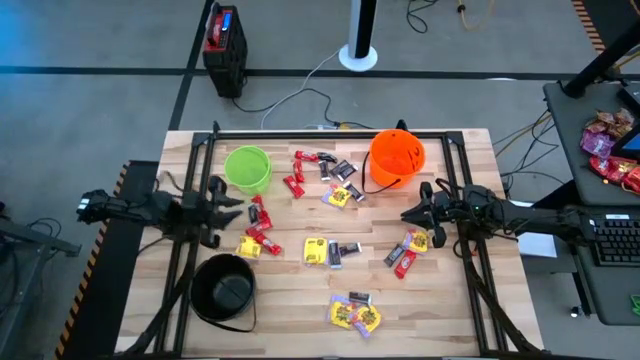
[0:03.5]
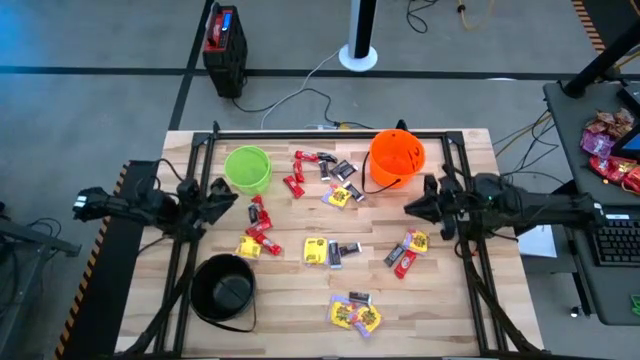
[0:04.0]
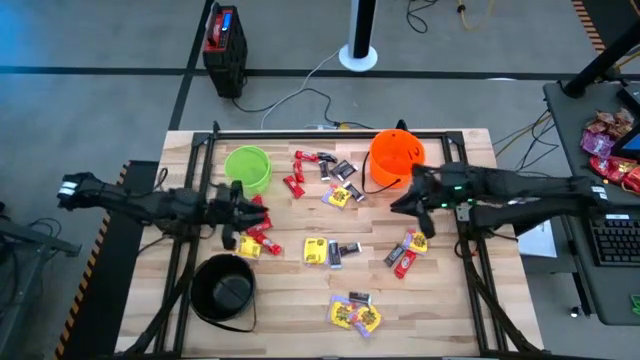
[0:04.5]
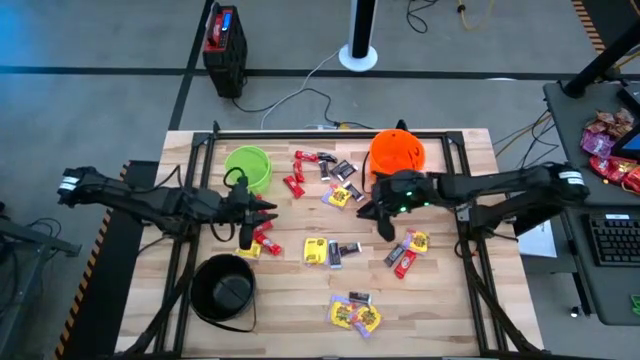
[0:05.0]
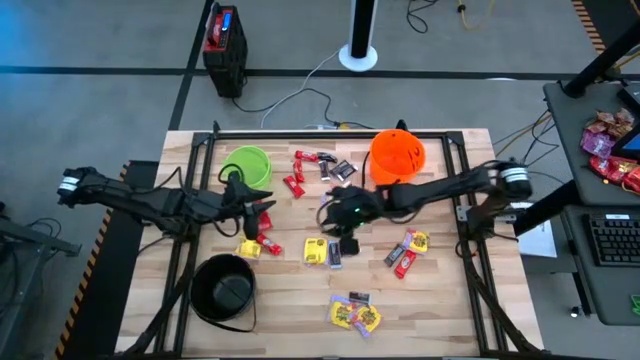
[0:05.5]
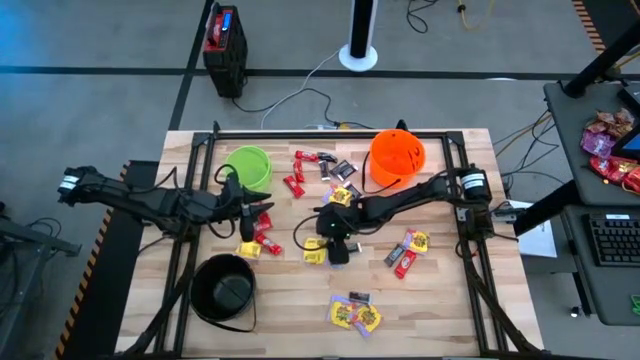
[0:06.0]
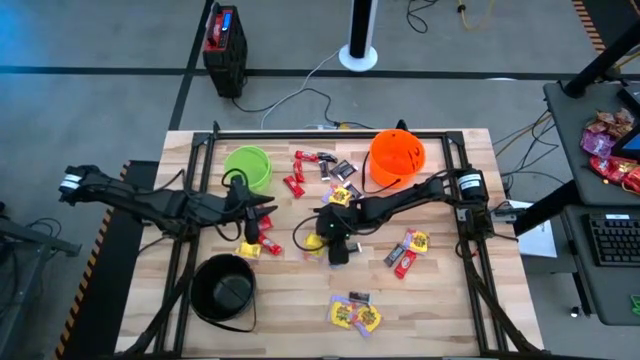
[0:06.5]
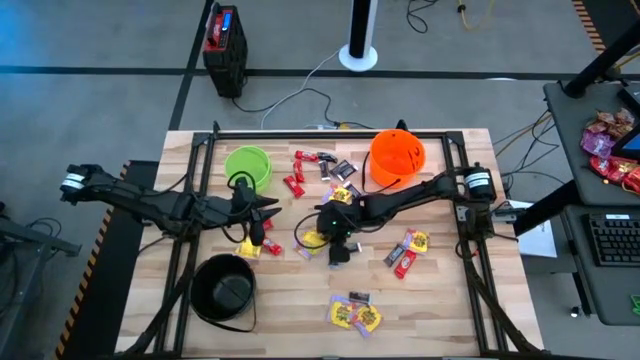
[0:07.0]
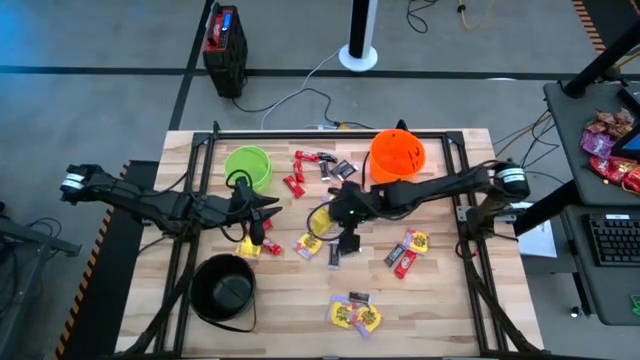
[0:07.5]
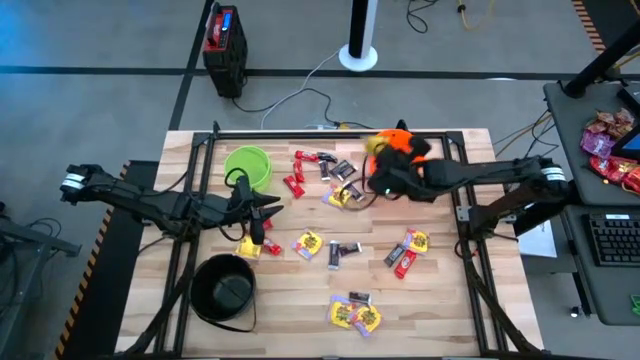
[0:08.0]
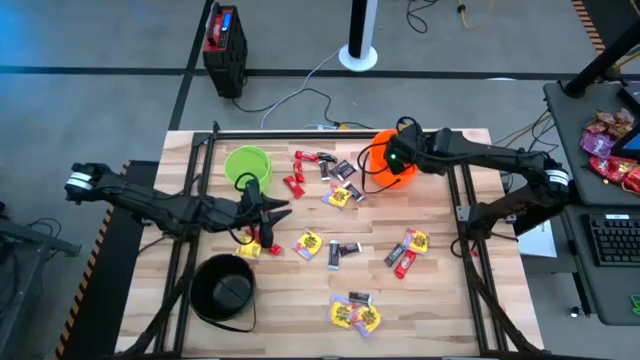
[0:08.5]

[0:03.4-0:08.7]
Task: Sort candy by brand, put in halloween buckets
Put the yellow candy into the orange bucket

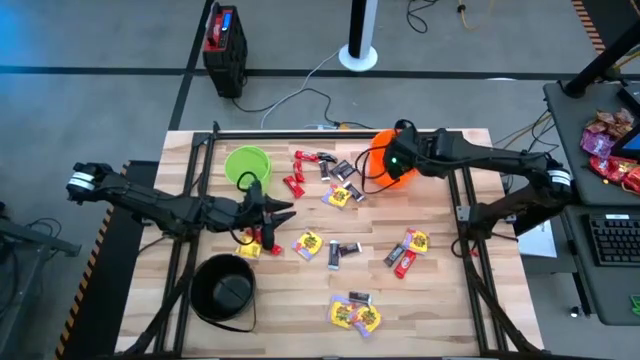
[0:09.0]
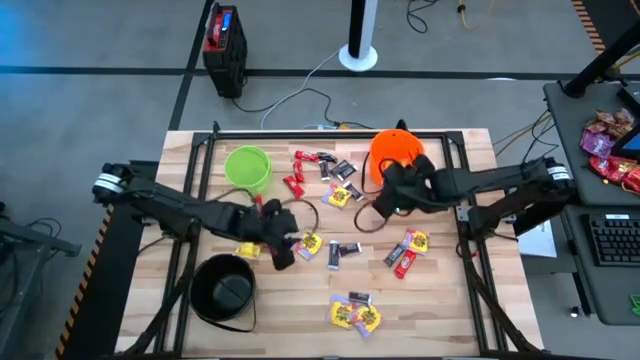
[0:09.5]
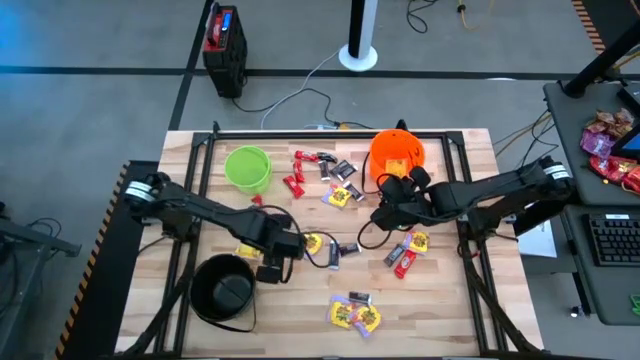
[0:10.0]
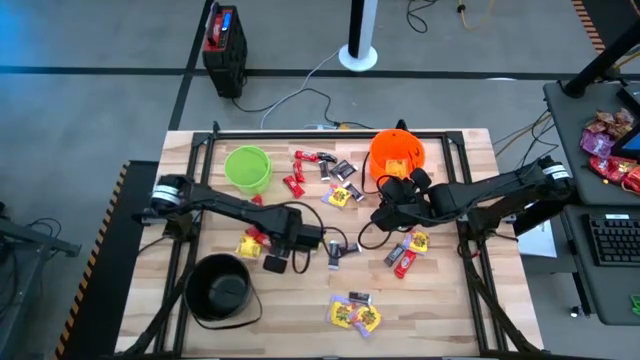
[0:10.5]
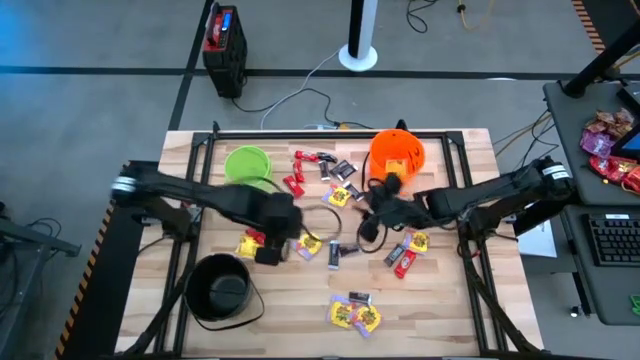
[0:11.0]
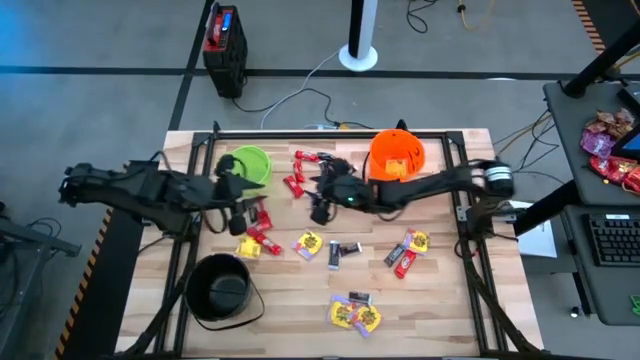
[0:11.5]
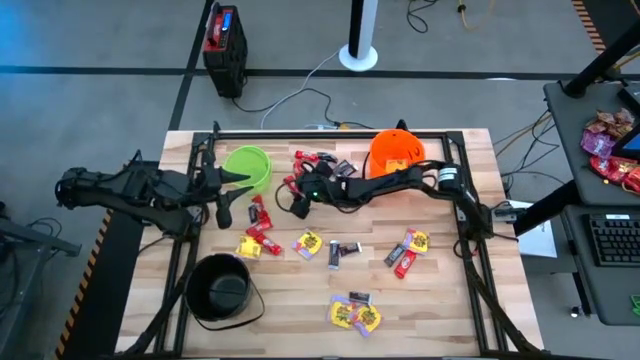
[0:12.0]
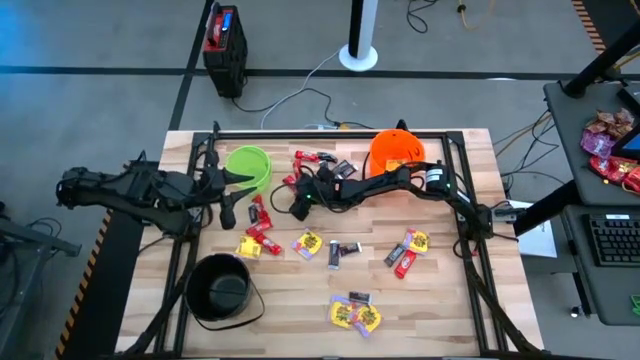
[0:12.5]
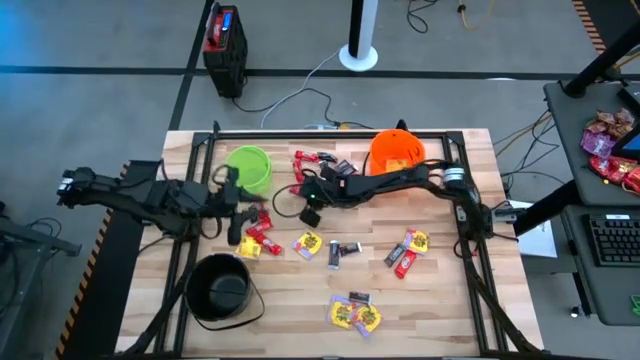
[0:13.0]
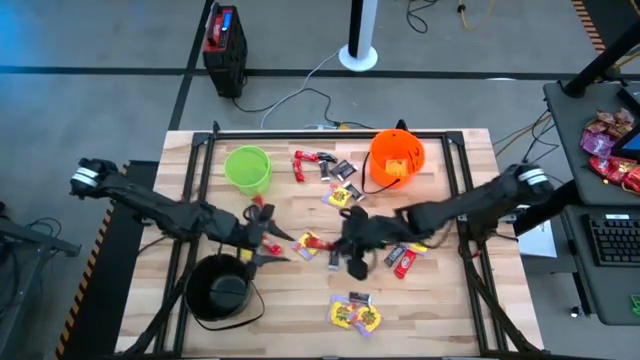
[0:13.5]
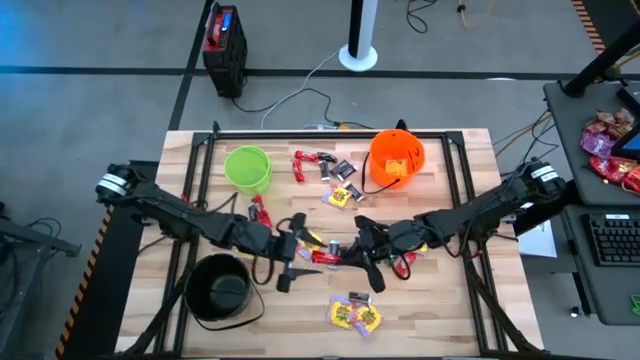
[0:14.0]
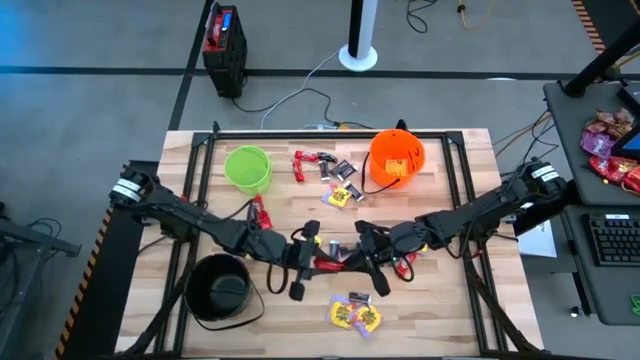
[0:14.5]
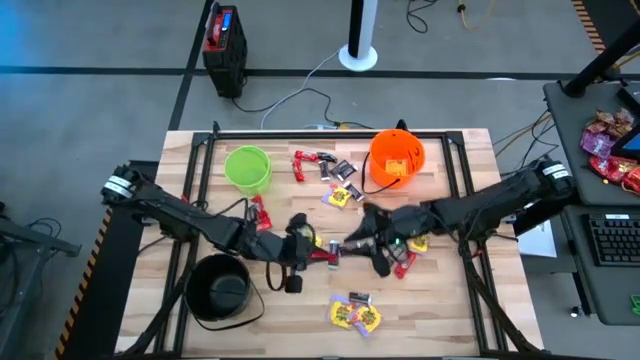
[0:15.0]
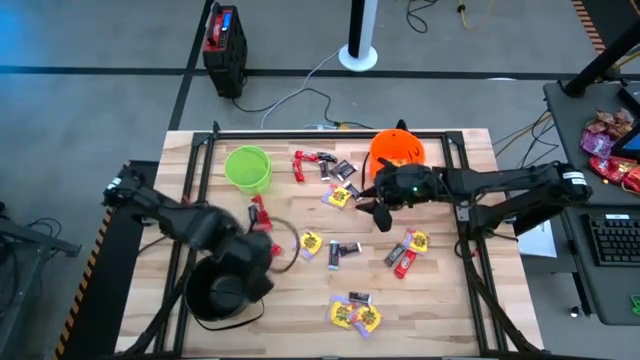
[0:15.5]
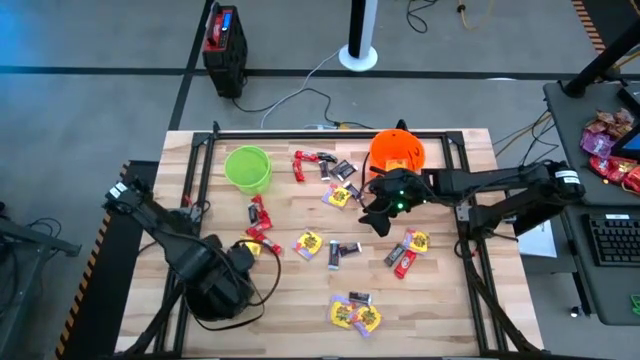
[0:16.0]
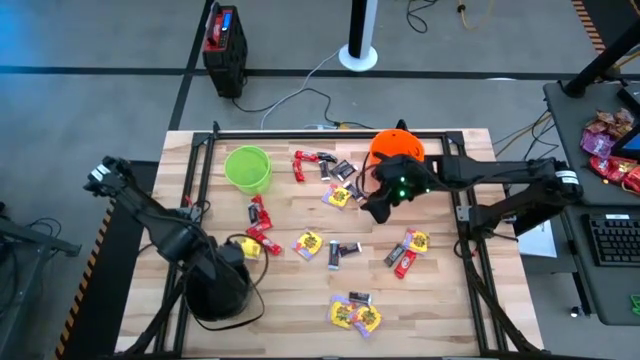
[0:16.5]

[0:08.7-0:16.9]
Put the red candy into the black bucket

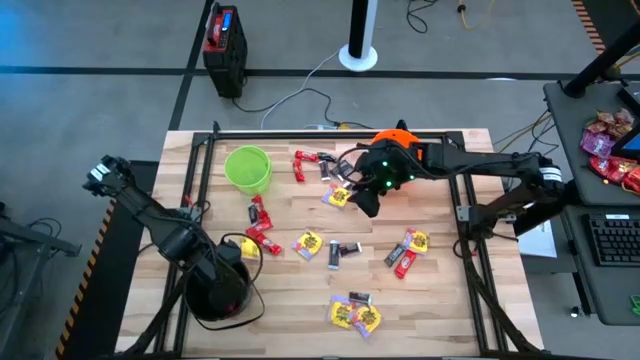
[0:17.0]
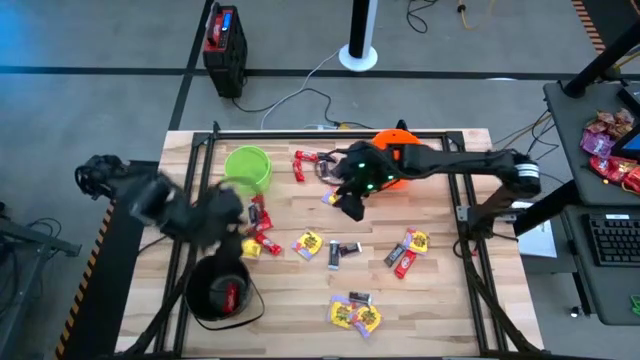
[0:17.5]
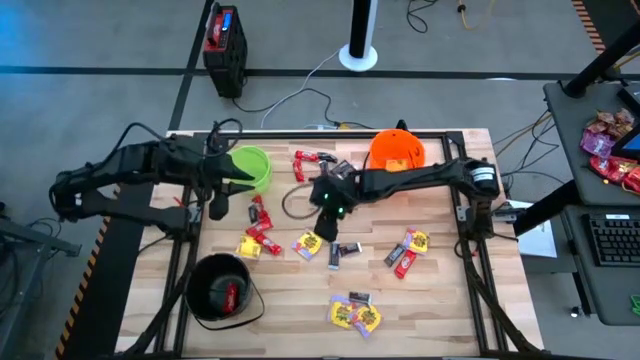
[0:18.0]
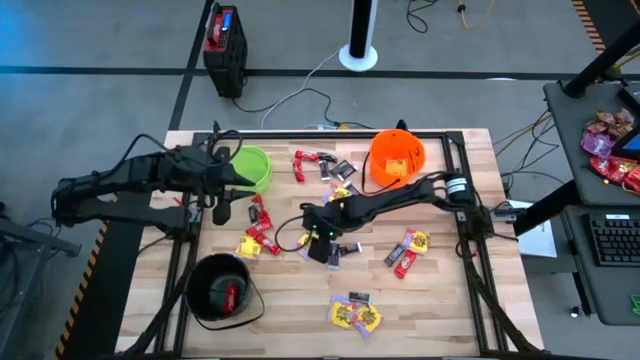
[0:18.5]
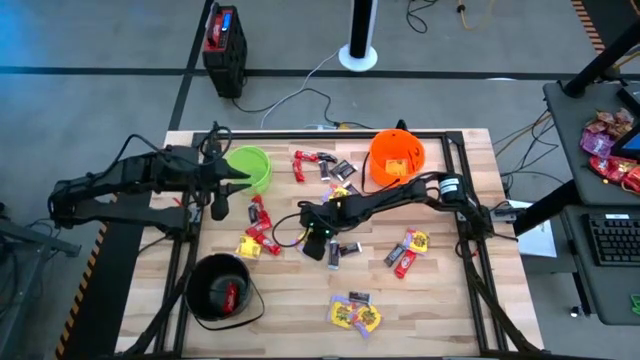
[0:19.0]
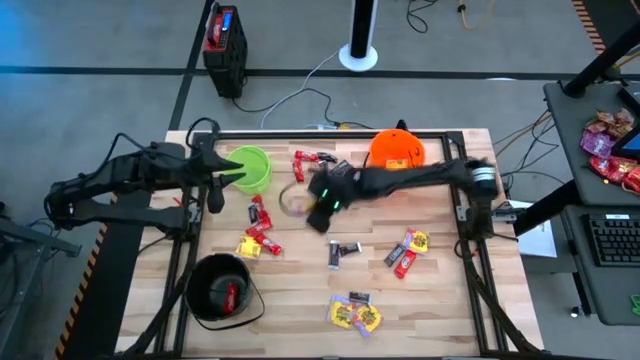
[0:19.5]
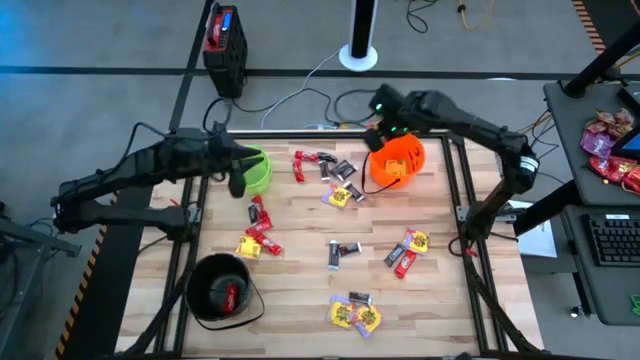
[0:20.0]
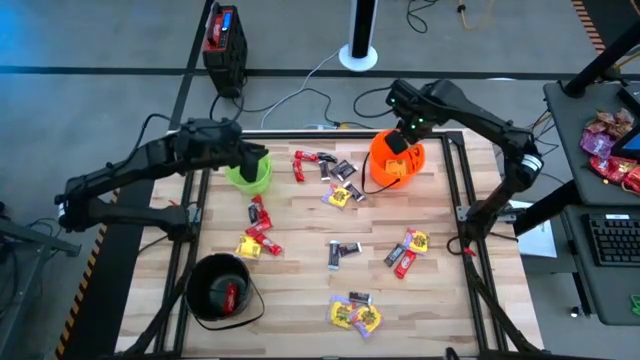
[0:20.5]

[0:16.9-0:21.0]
Put the yellow candy into the orange bucket

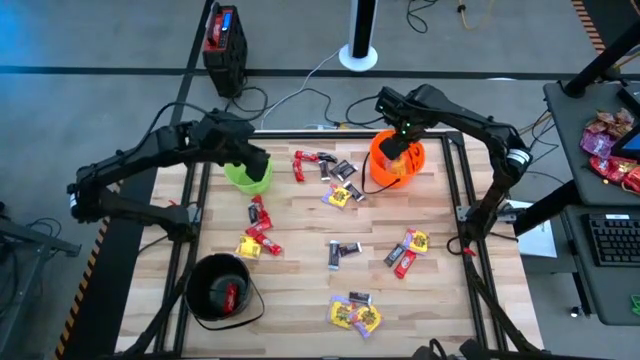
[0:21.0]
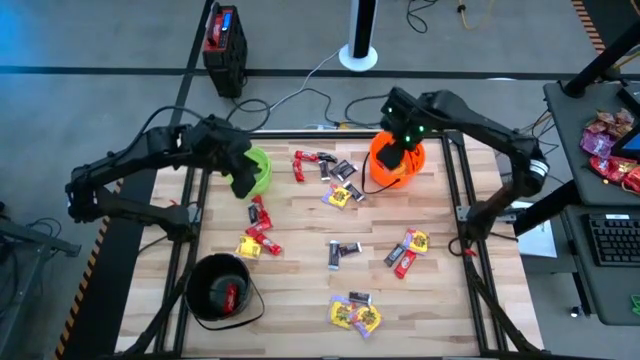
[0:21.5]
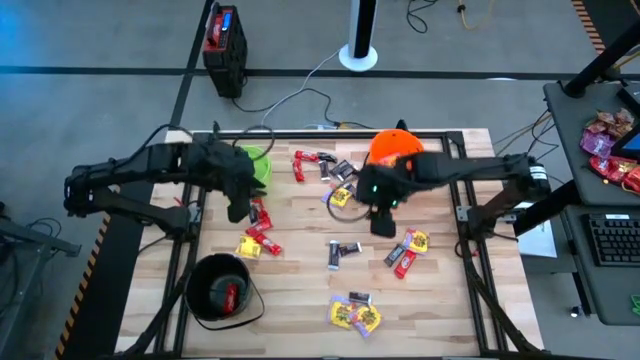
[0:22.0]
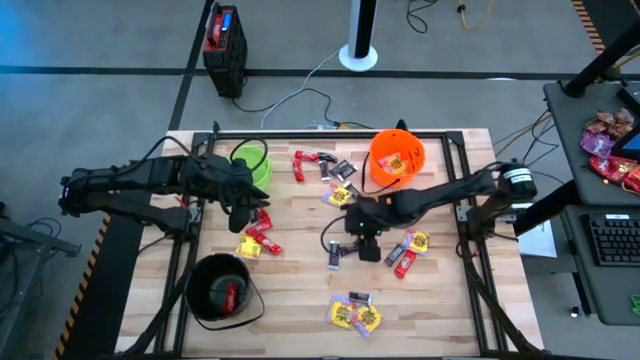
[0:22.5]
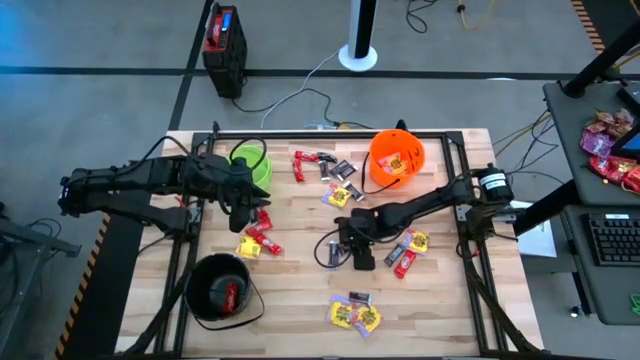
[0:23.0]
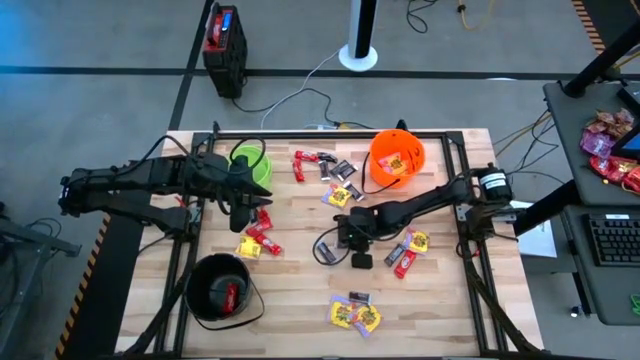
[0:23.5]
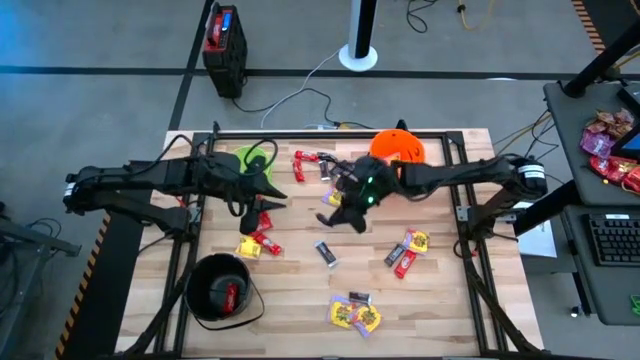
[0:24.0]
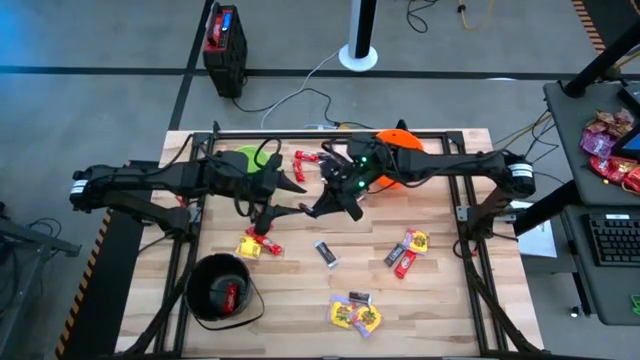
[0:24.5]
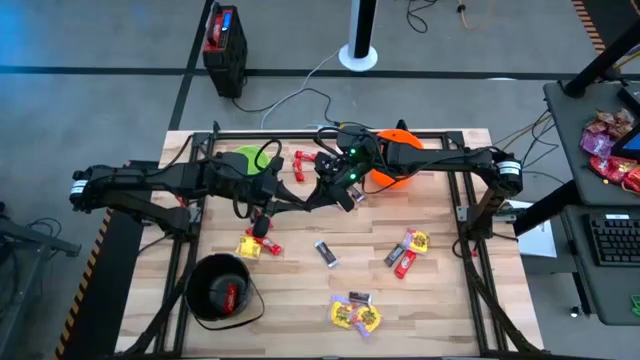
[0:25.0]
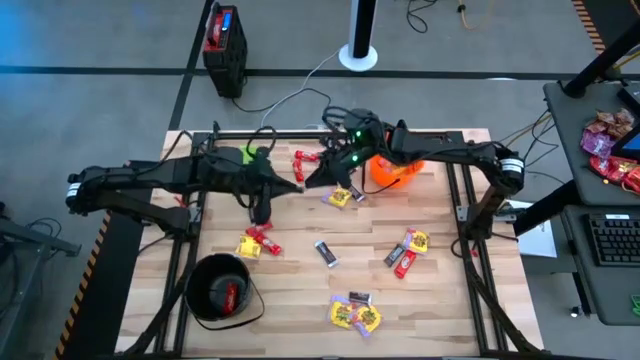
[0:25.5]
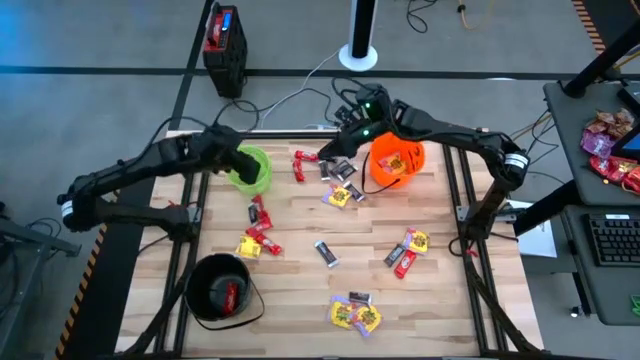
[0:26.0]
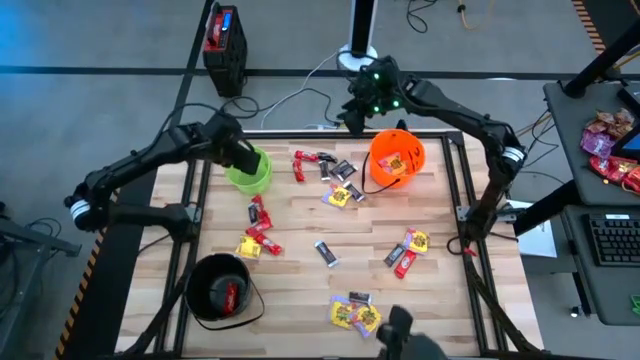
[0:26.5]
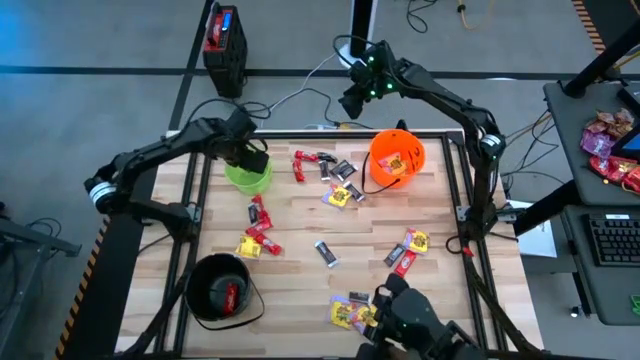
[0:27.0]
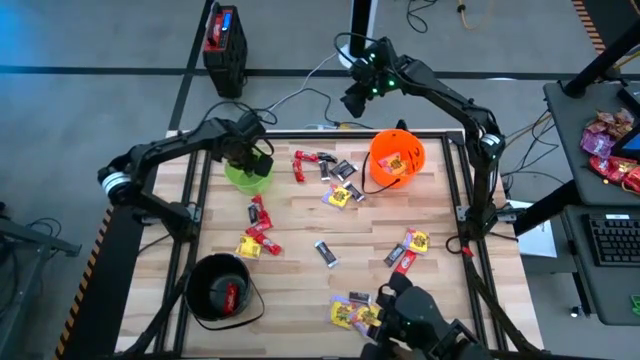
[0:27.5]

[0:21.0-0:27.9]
Put the brown candy into the green bucket
